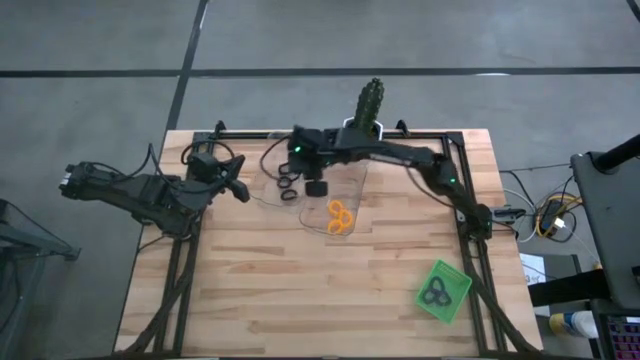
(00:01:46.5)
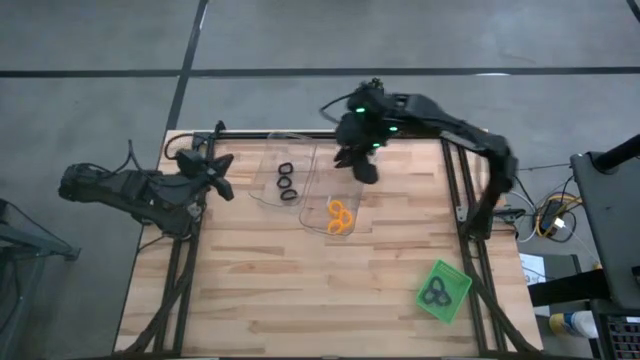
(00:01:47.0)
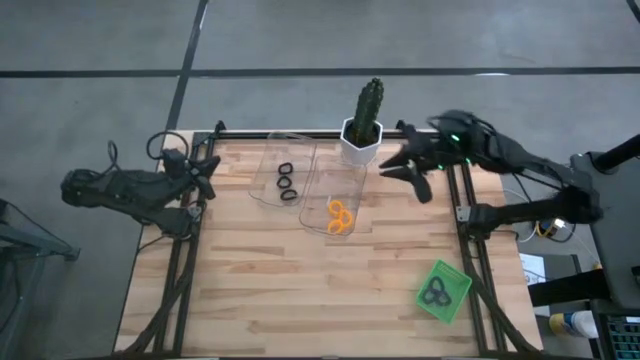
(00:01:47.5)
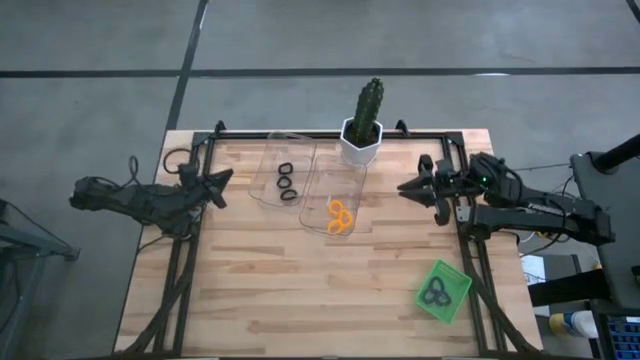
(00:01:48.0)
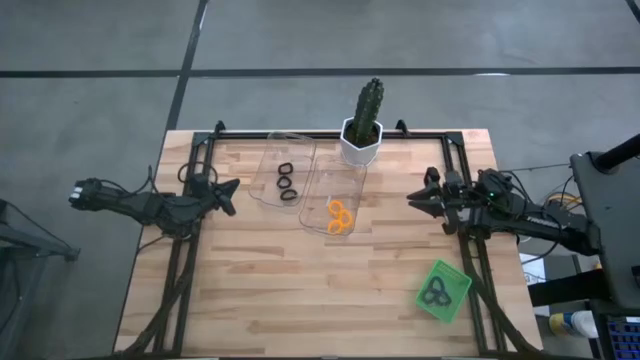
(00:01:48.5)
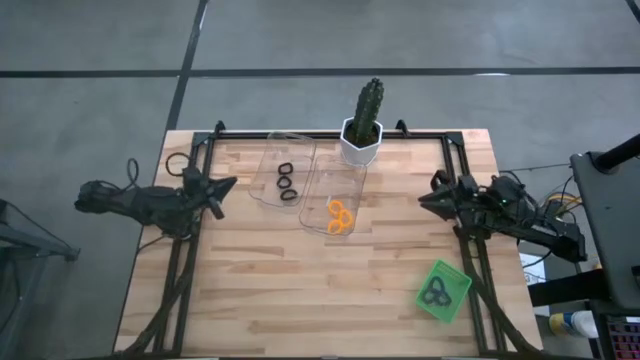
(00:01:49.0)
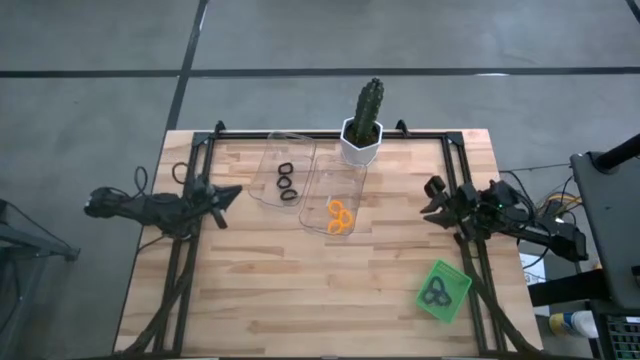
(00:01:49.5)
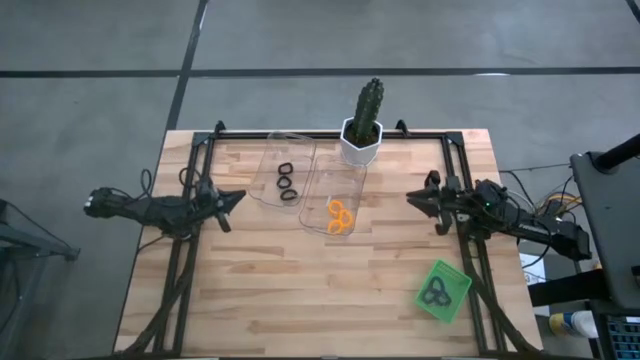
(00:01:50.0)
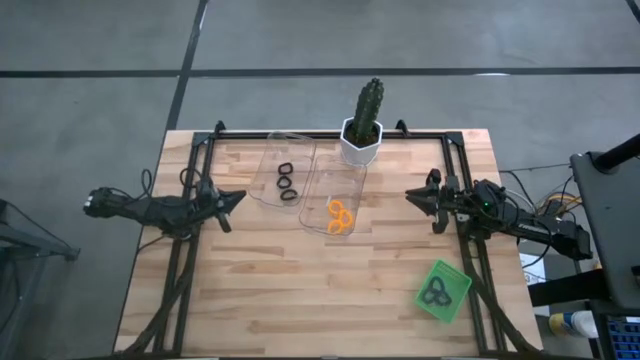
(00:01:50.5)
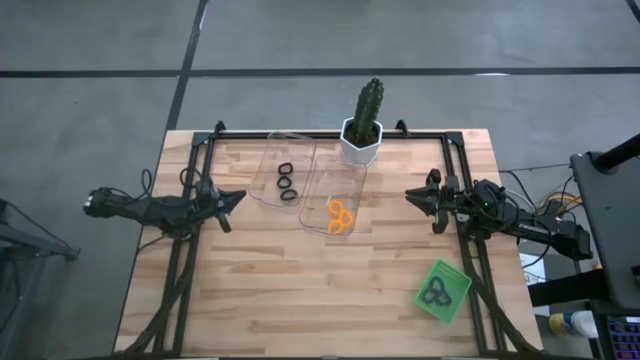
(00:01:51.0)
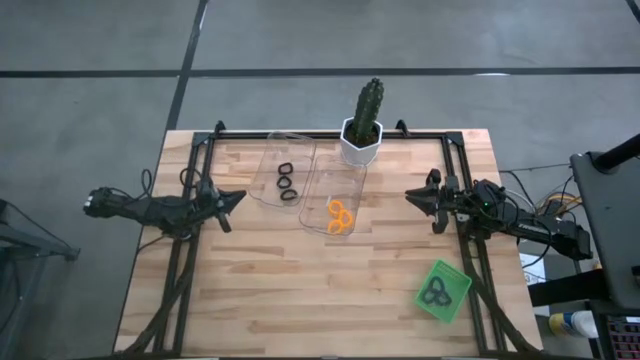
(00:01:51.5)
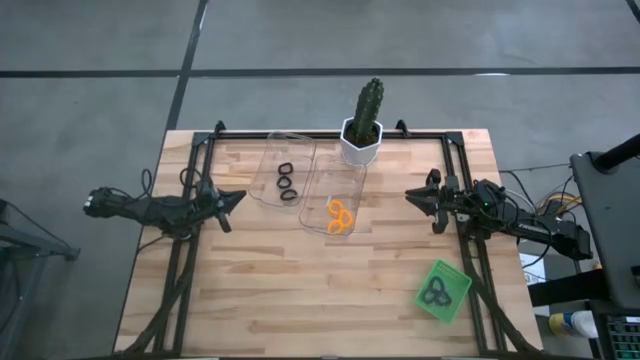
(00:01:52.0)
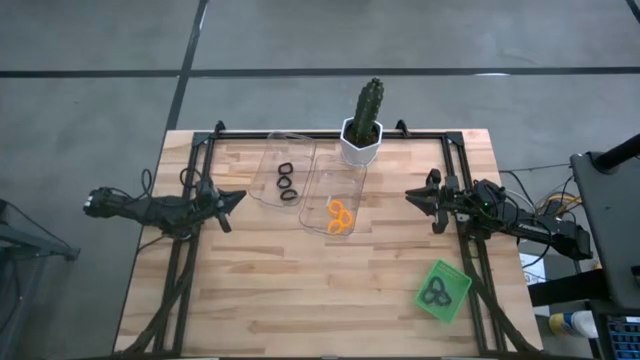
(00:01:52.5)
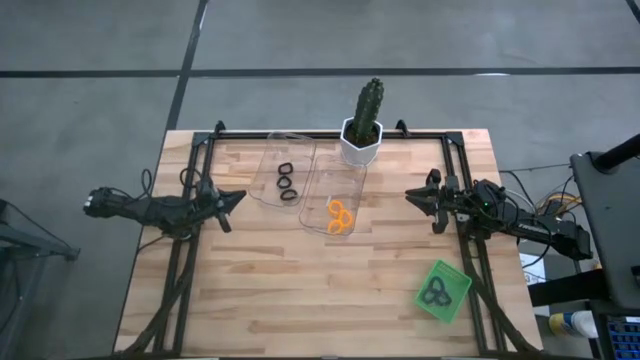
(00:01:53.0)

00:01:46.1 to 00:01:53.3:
Task: Sort items
Return to Home Position

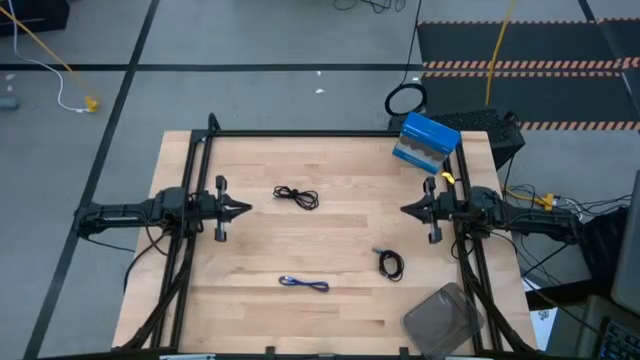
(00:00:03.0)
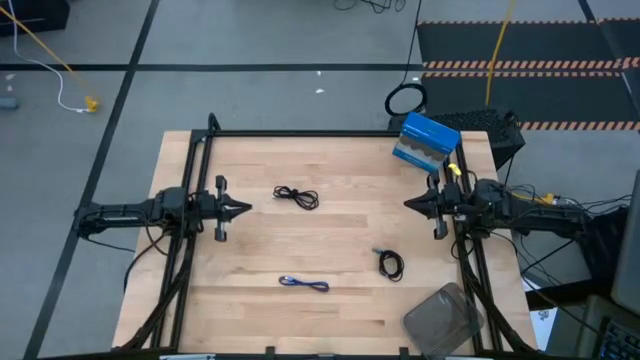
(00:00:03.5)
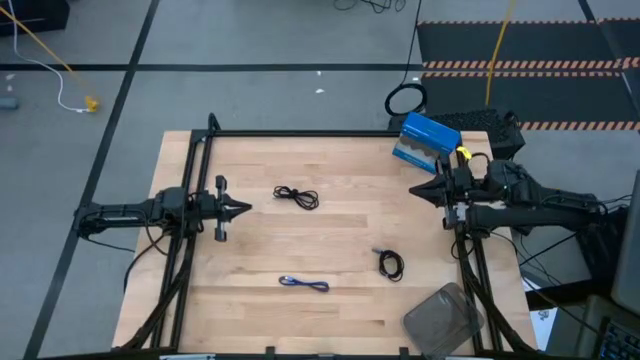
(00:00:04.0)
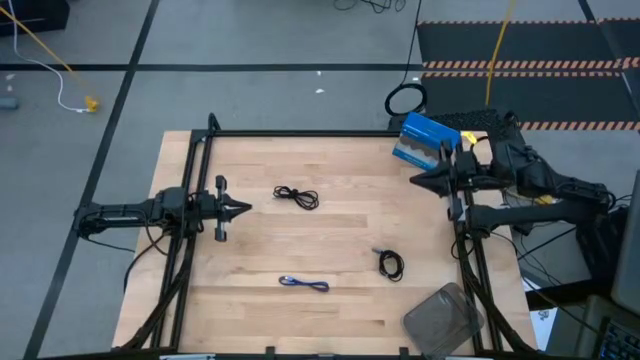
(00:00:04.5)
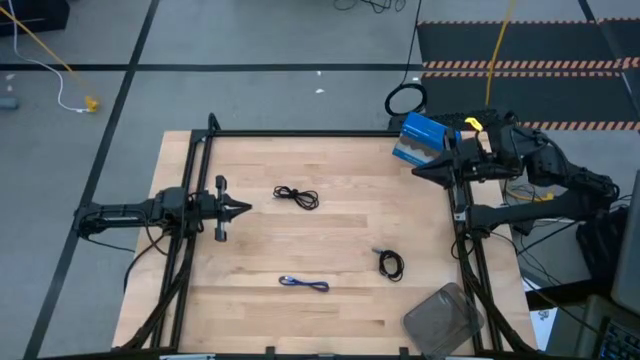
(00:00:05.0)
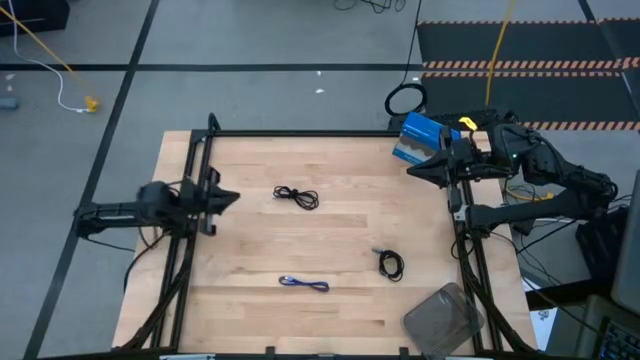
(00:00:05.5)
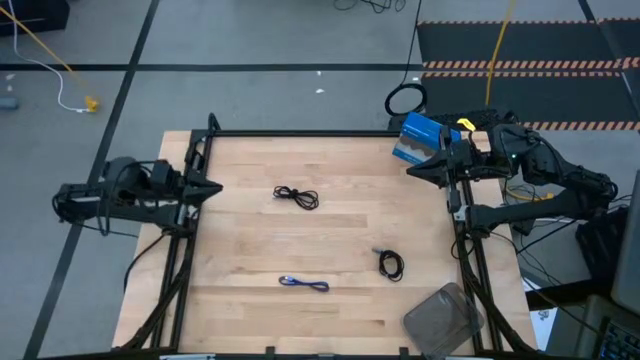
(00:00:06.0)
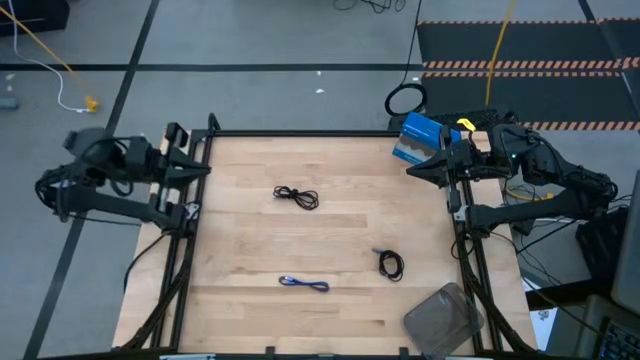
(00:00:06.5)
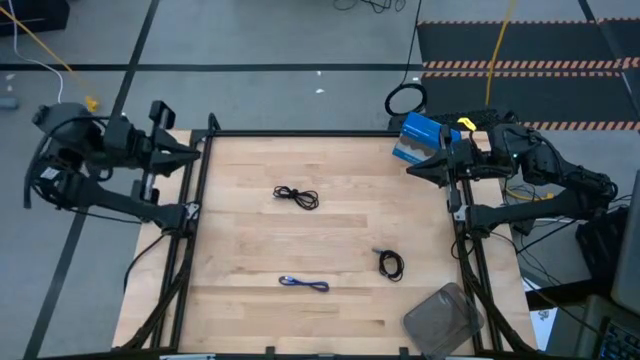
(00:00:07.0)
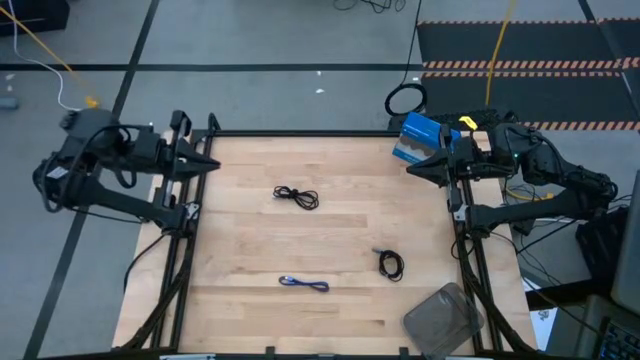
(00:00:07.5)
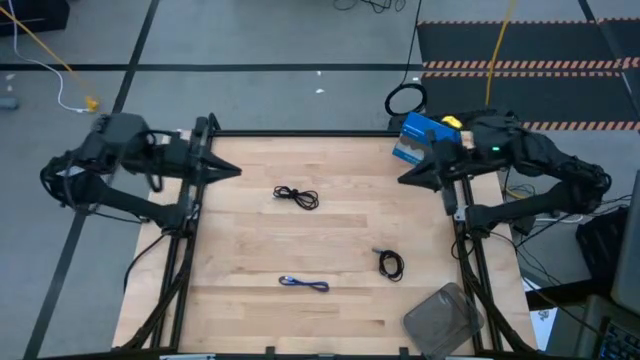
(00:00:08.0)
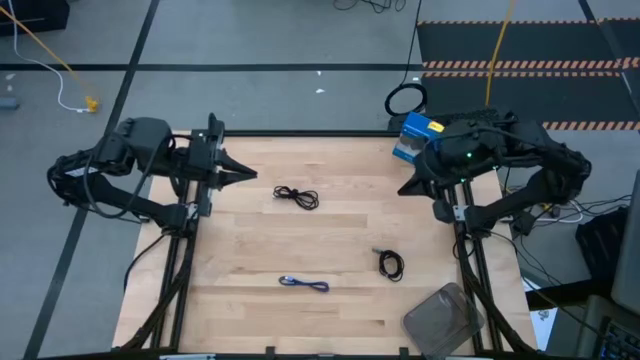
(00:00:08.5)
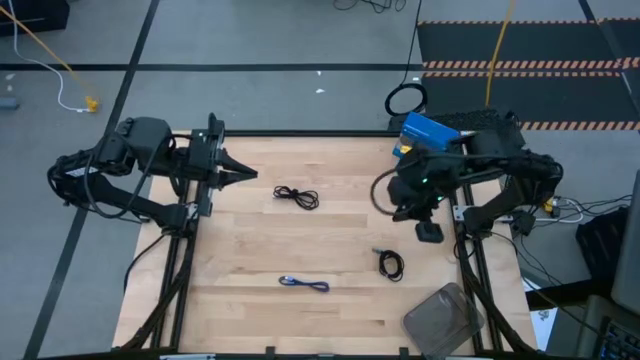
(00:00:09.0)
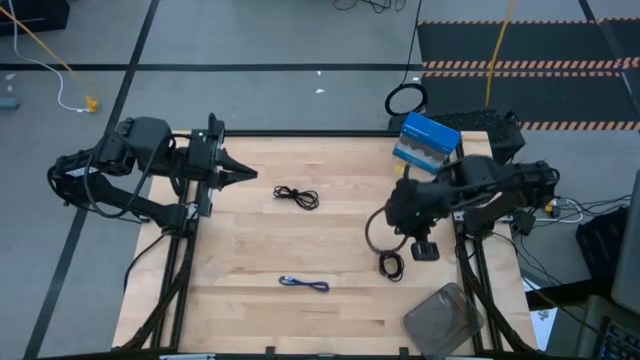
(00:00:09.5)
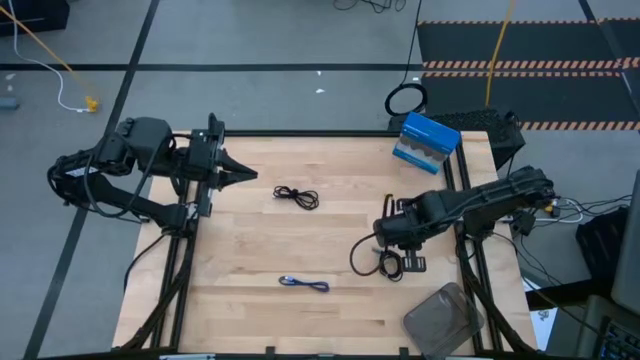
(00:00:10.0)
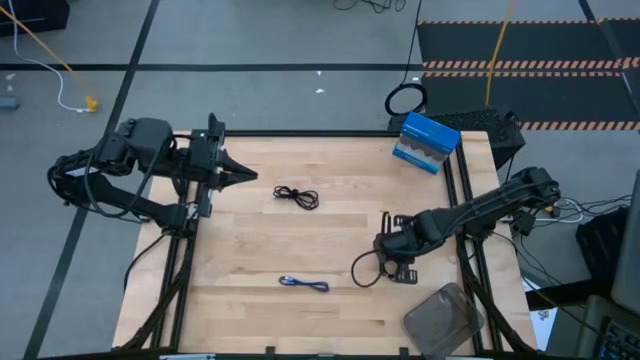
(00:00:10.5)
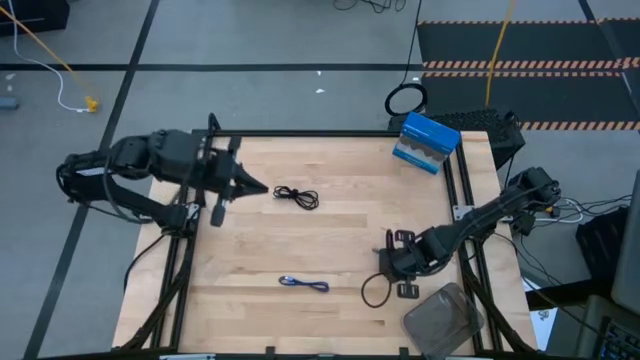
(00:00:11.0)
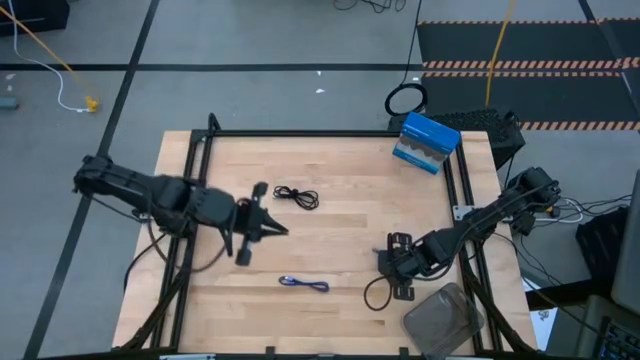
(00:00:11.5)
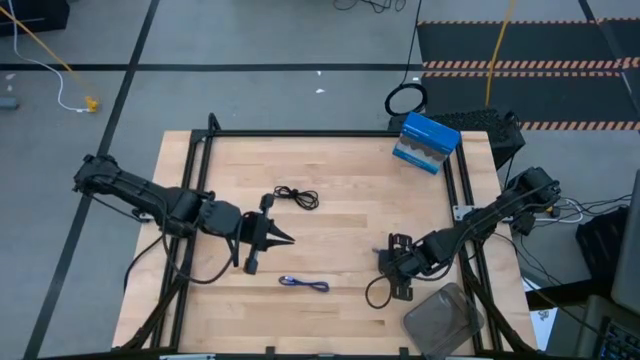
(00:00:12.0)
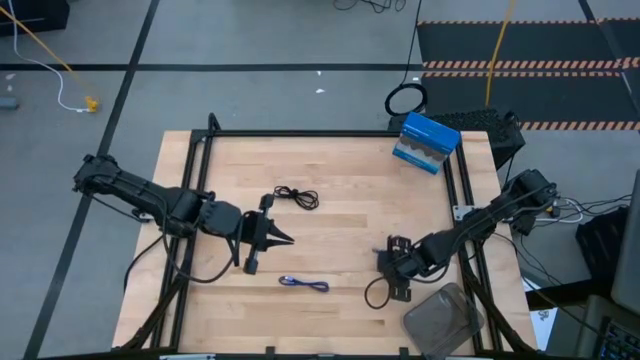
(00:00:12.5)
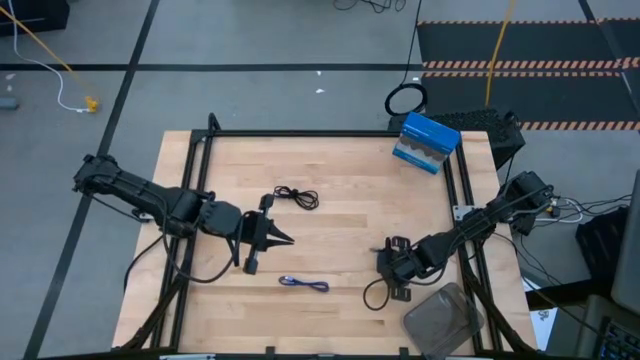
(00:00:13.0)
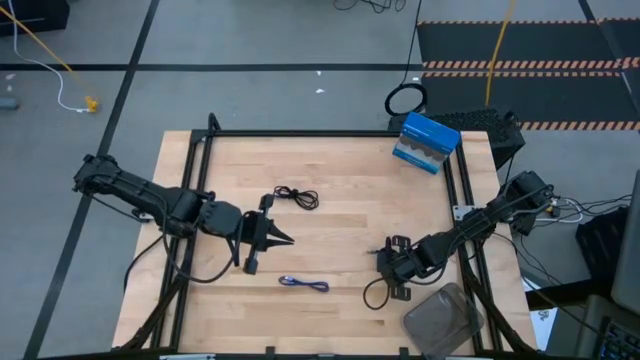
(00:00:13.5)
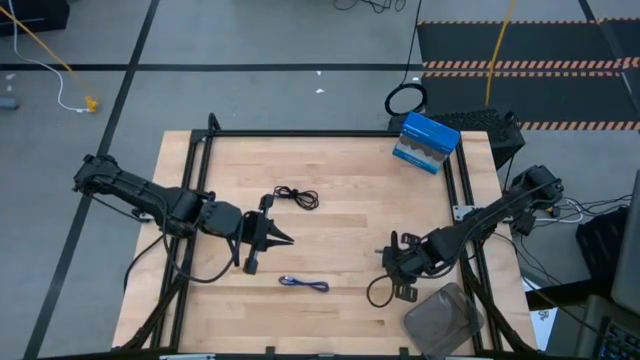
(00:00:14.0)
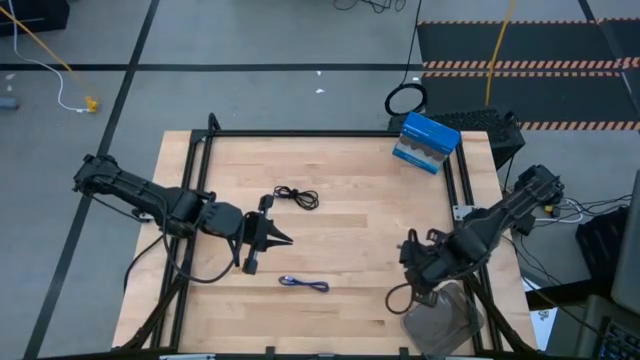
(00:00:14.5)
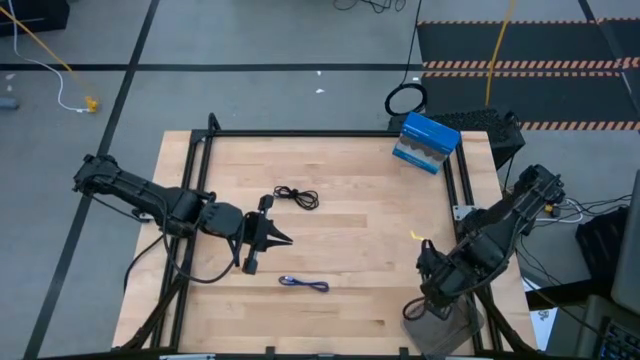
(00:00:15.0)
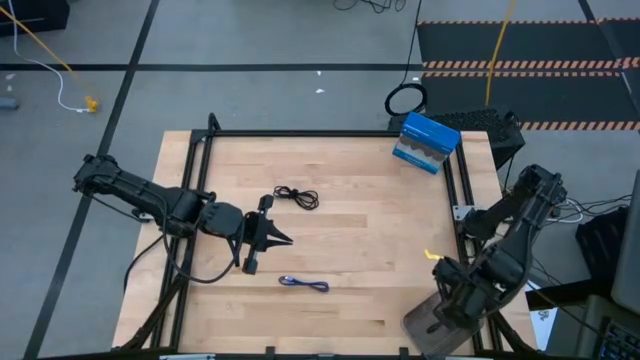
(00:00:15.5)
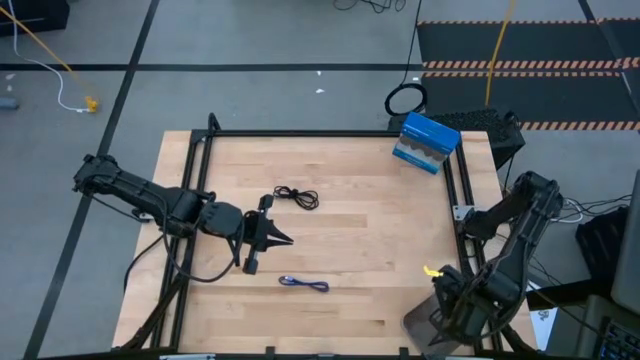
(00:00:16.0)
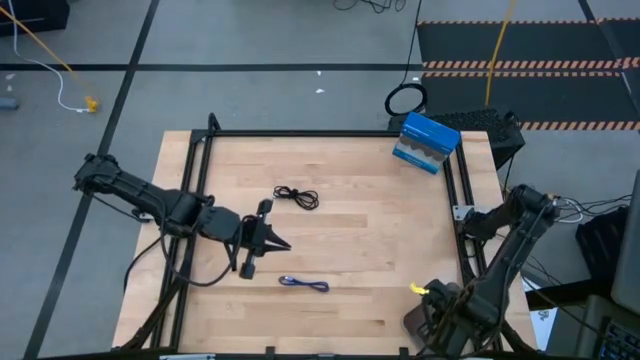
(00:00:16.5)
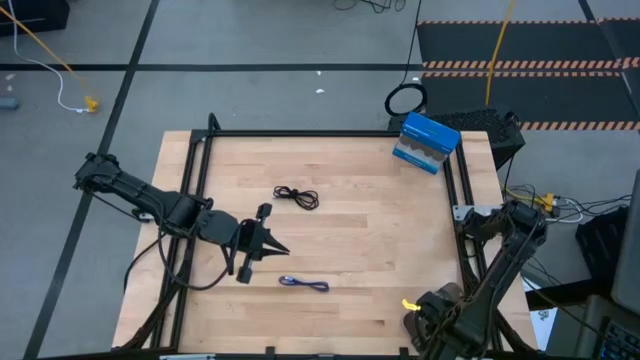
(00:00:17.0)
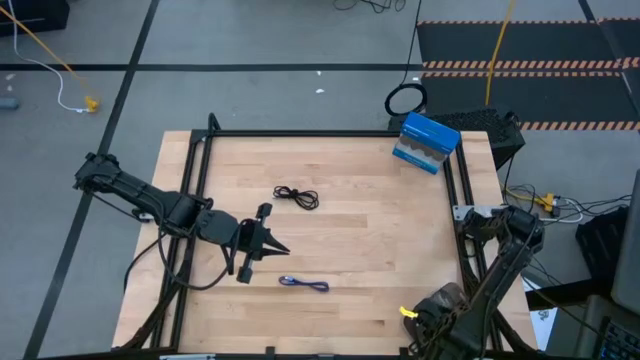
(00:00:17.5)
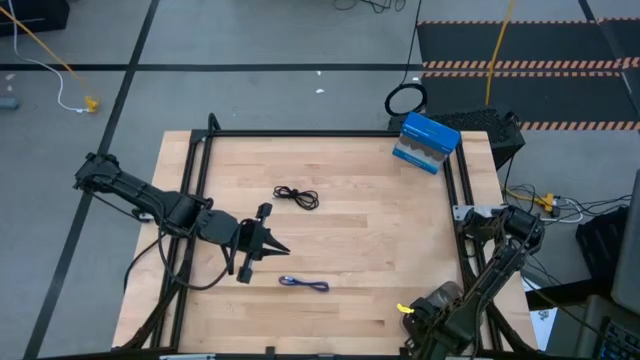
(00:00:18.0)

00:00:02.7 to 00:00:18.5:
Task: Pick and place USB-C Cables
Put the bottom black charger cable into the black bin
